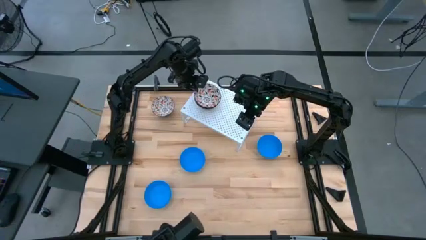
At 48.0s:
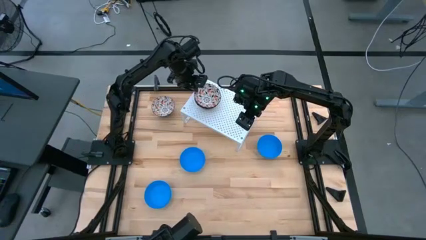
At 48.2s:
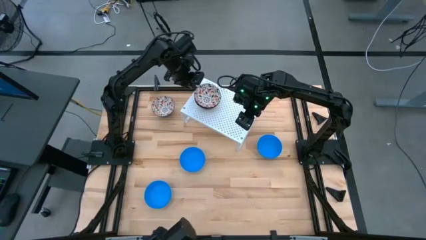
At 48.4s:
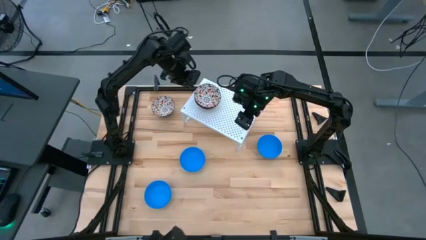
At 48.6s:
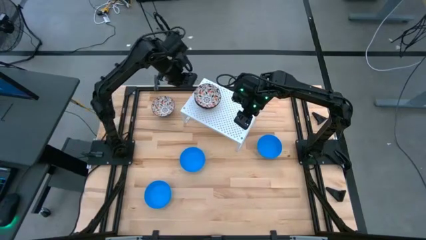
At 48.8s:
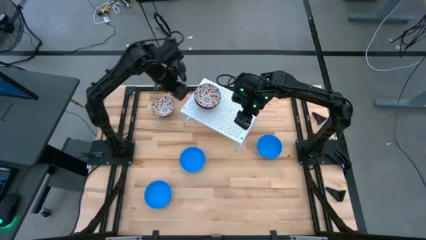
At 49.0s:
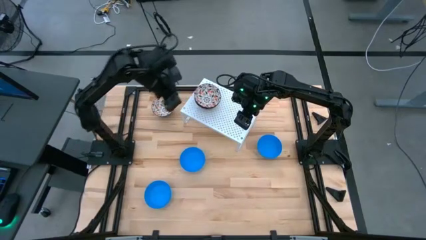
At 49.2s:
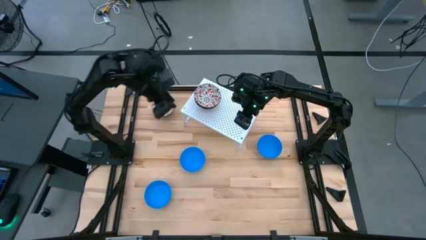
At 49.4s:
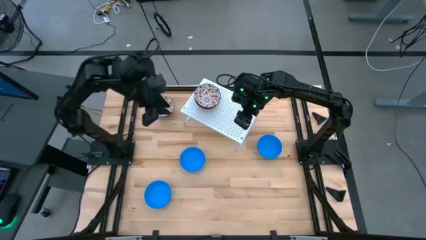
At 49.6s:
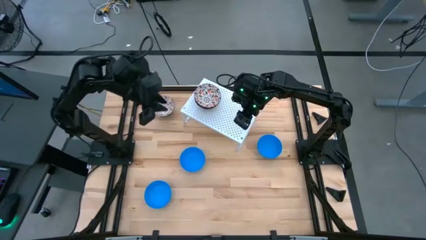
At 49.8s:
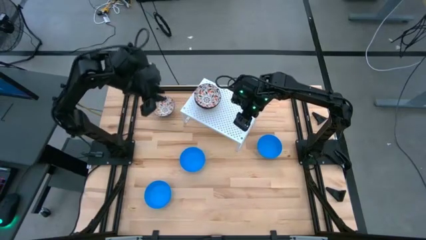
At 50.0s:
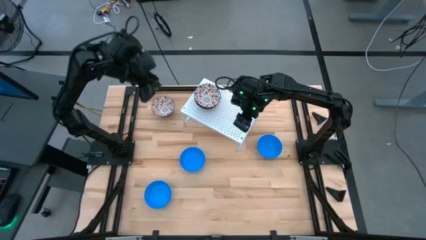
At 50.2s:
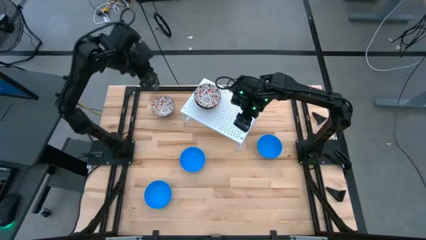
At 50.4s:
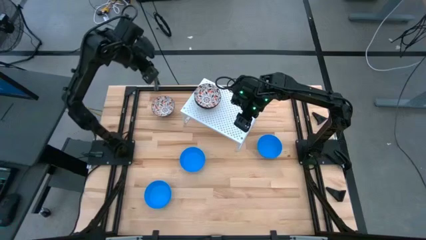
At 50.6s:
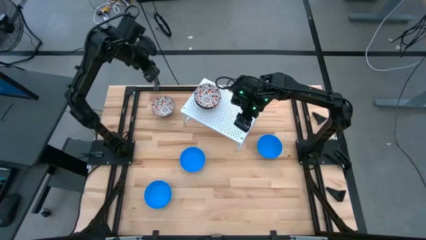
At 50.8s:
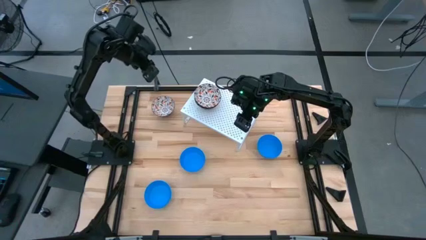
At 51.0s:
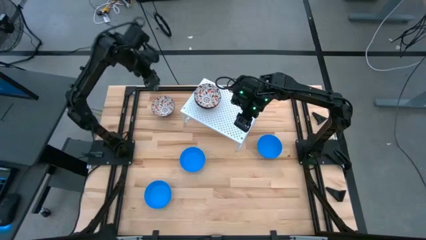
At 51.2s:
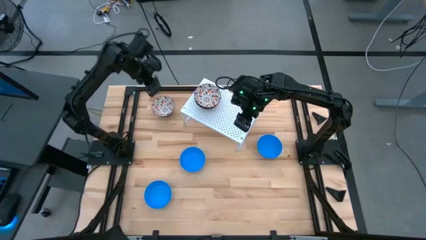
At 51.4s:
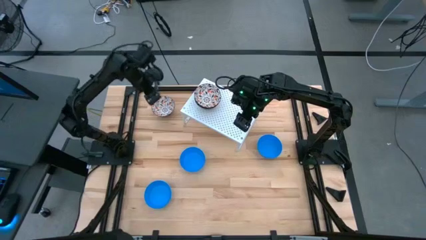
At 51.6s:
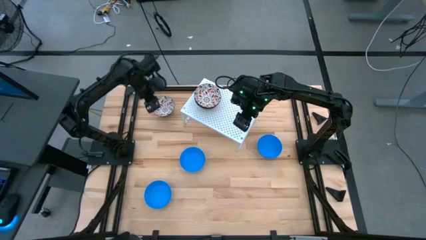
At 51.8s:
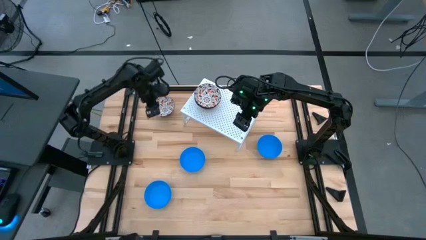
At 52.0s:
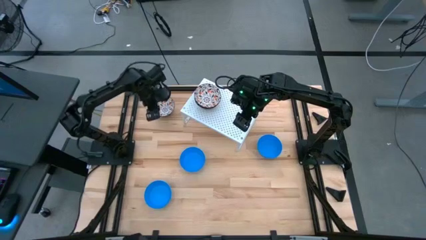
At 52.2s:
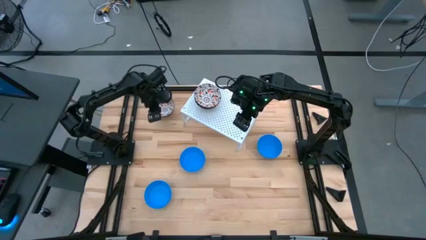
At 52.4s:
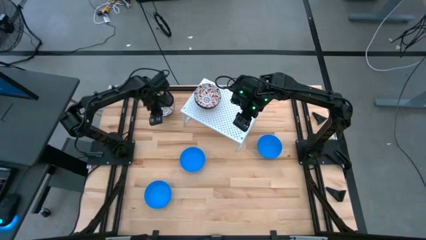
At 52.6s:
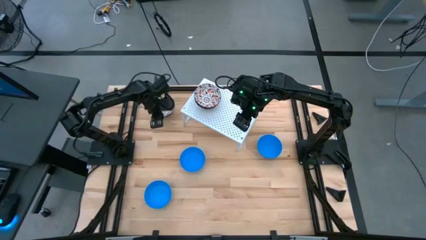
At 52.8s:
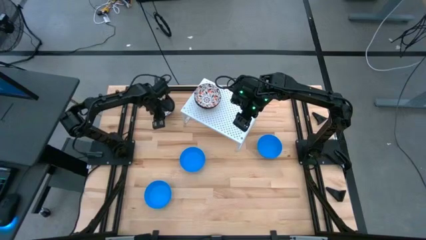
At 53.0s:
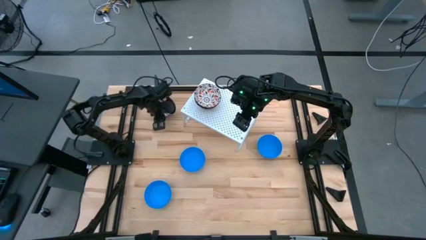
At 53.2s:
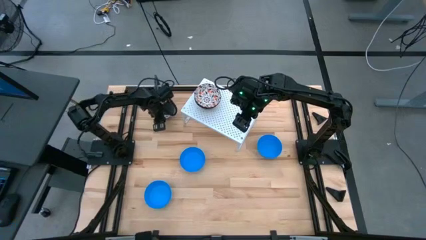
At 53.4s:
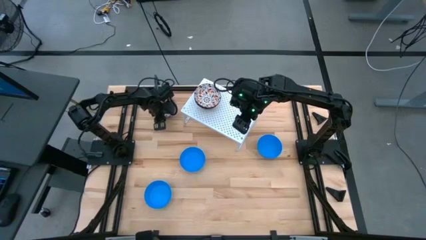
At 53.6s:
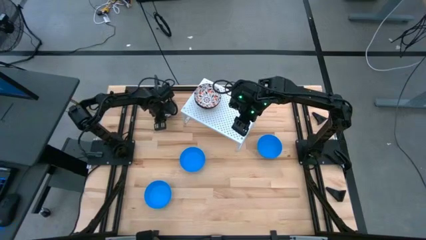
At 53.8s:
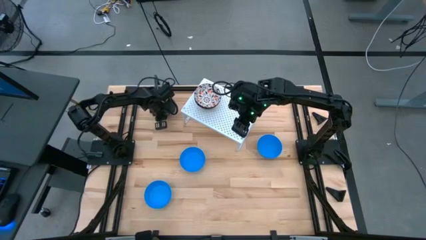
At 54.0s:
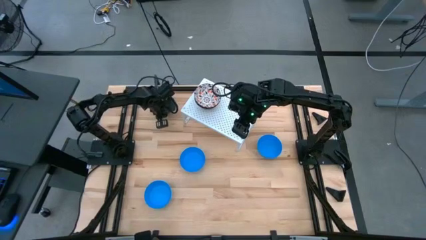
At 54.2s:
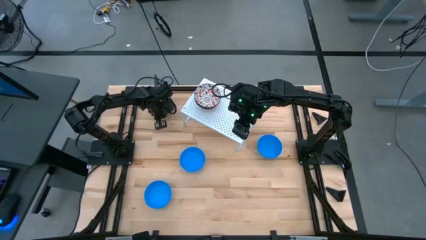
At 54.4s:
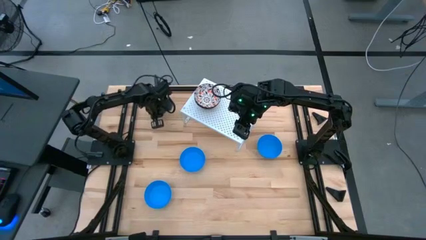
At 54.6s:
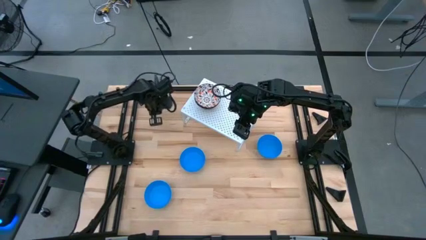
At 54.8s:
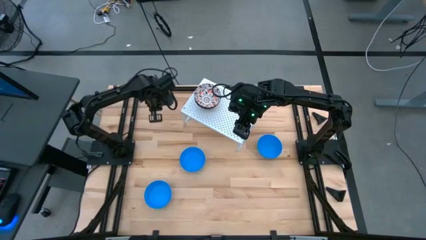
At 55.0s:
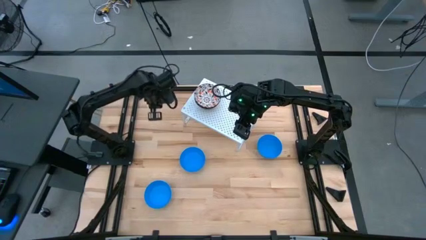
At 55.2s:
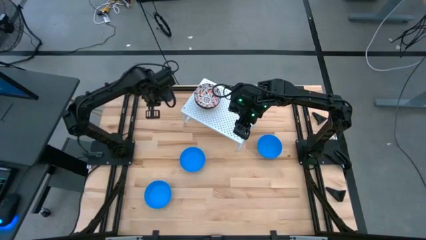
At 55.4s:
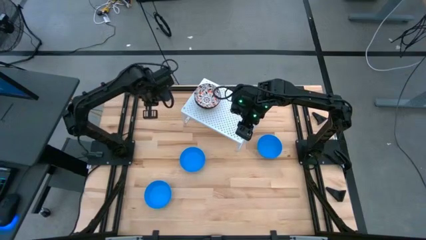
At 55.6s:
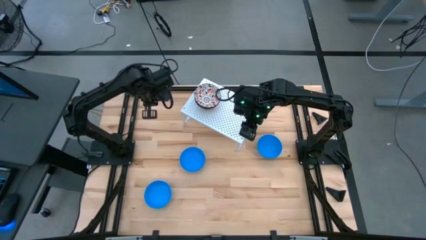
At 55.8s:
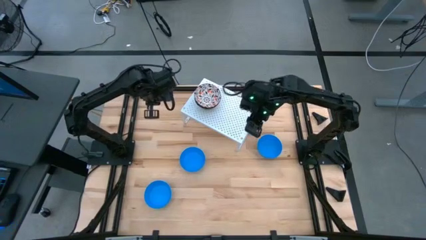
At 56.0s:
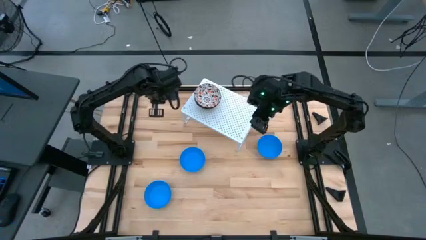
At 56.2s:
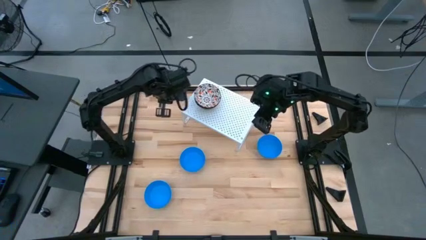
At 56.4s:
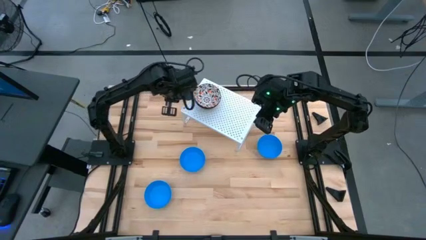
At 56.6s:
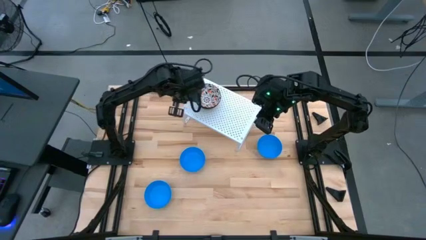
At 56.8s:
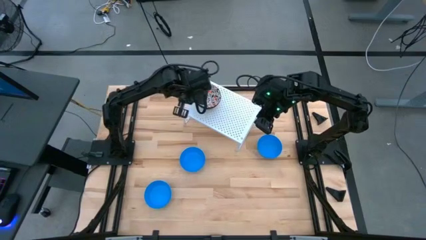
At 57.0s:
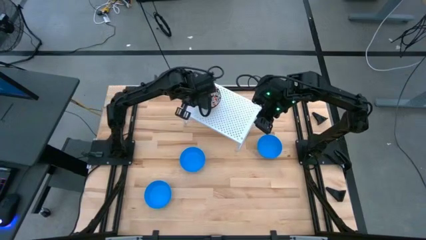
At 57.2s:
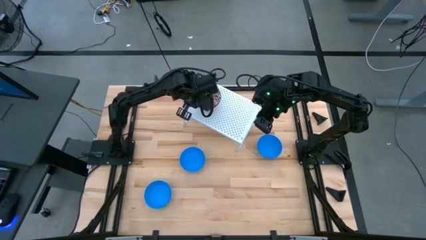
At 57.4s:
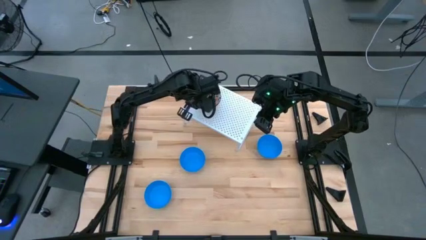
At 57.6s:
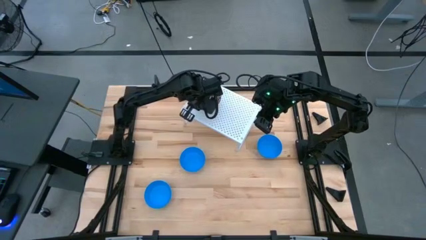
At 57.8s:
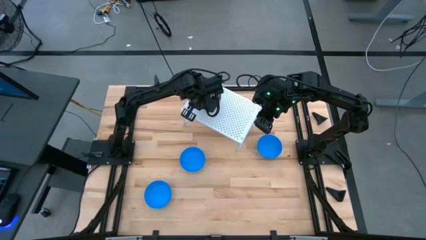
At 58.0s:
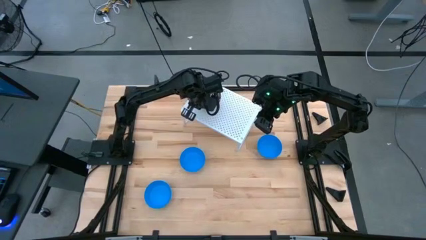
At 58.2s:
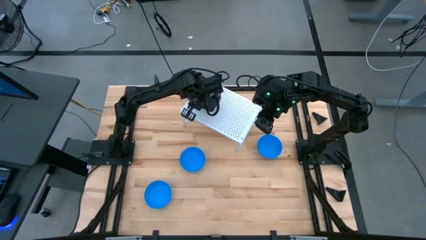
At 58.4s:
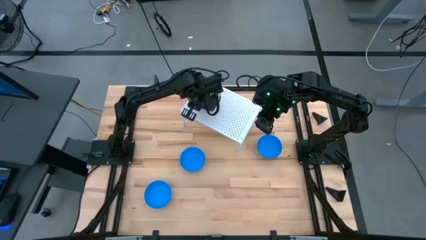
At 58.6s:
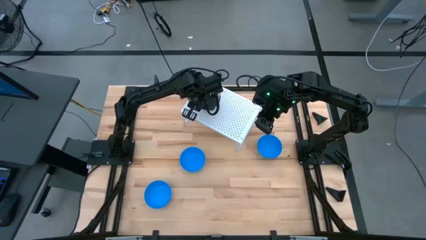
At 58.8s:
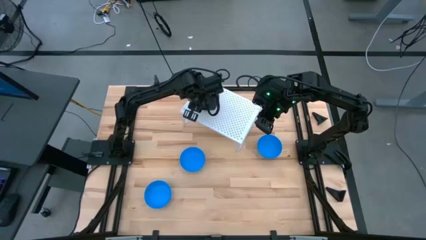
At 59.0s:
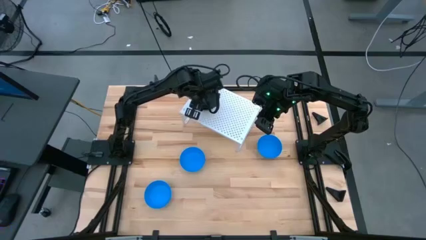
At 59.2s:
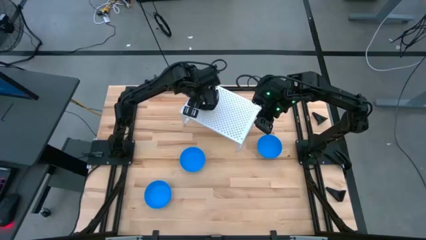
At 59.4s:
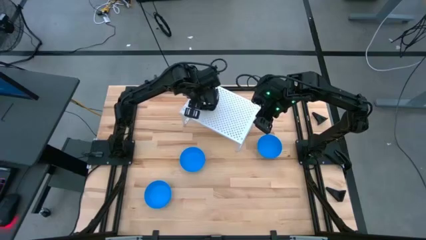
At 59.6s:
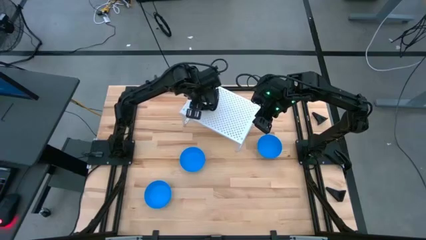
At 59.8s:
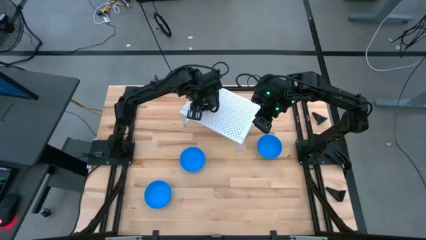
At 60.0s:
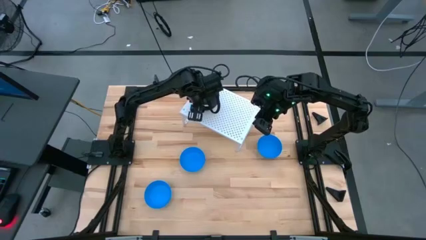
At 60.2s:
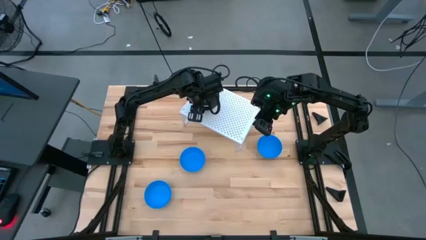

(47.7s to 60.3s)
Task: Pick & Place Mini bowls
Stack the white patterned bowl on top of the other white patterned bowls on the shelf

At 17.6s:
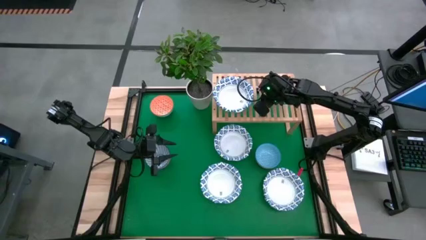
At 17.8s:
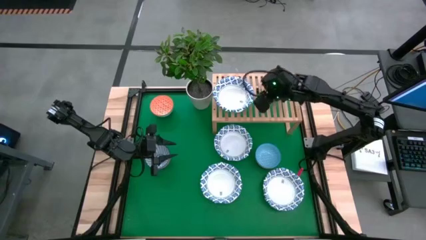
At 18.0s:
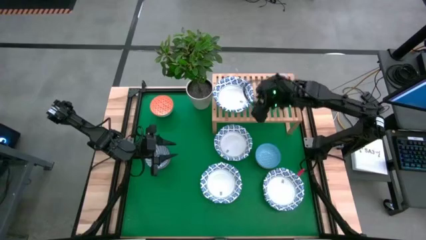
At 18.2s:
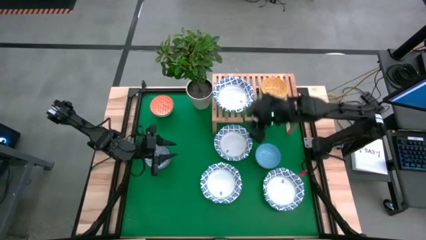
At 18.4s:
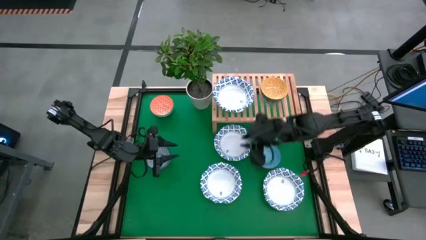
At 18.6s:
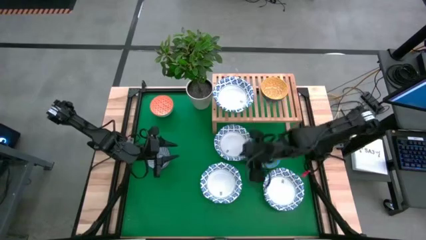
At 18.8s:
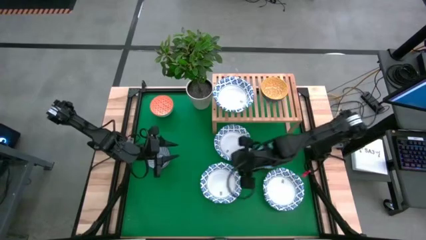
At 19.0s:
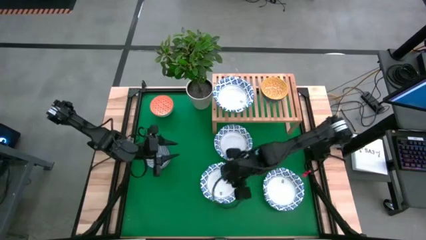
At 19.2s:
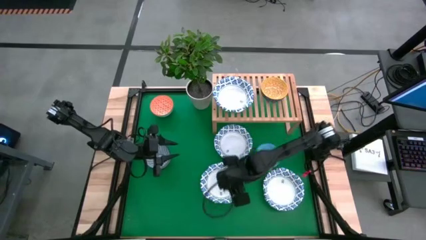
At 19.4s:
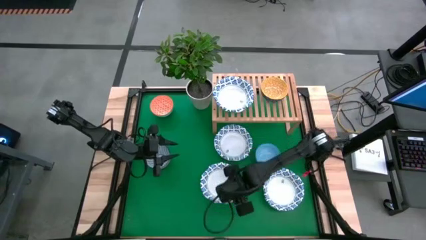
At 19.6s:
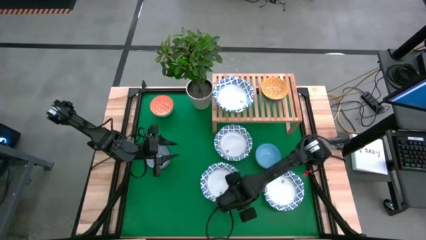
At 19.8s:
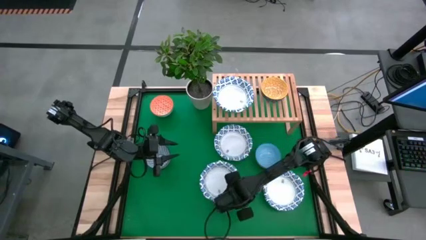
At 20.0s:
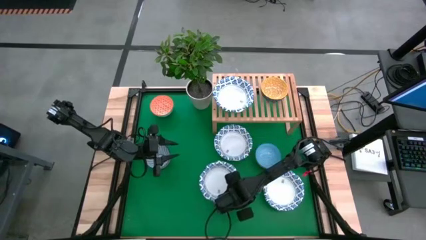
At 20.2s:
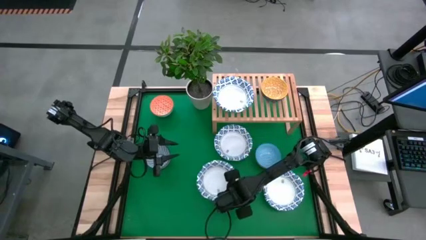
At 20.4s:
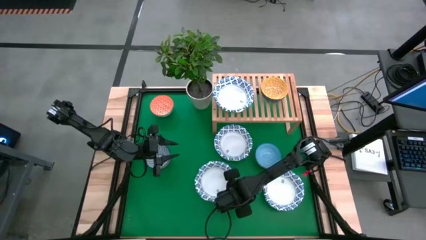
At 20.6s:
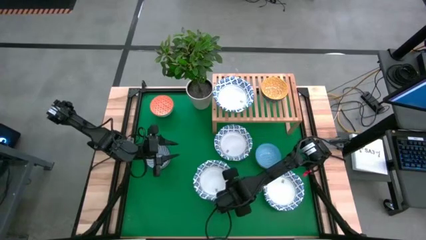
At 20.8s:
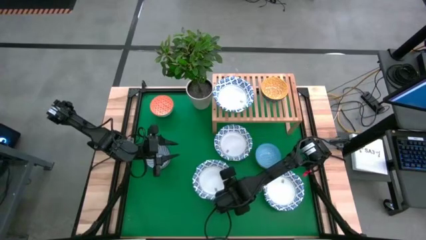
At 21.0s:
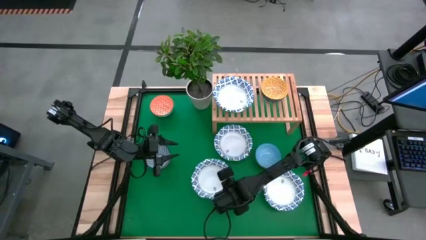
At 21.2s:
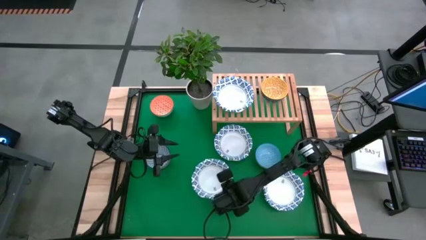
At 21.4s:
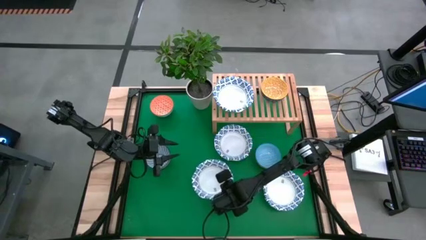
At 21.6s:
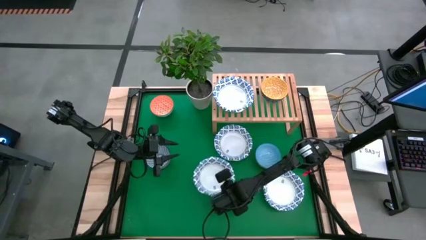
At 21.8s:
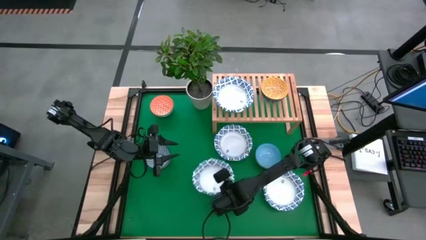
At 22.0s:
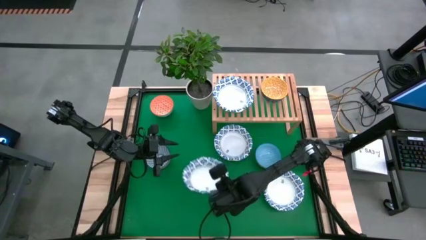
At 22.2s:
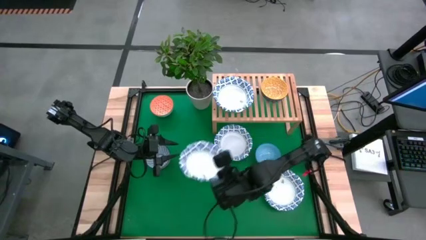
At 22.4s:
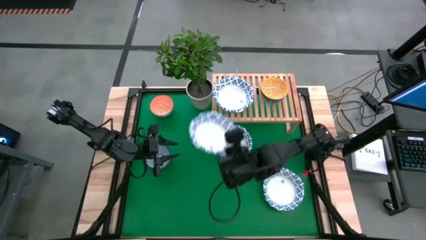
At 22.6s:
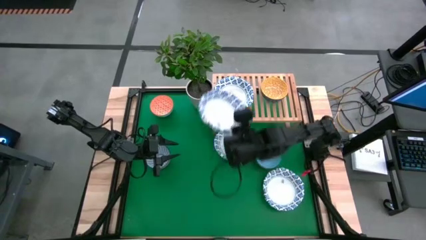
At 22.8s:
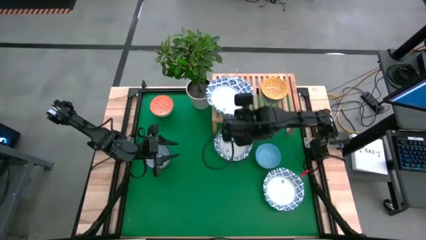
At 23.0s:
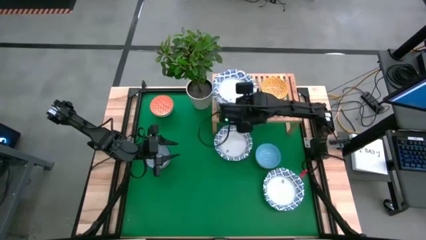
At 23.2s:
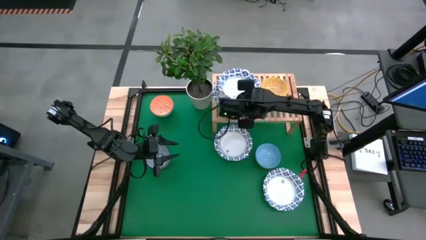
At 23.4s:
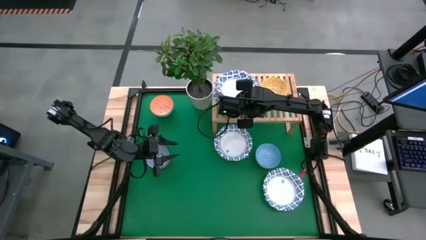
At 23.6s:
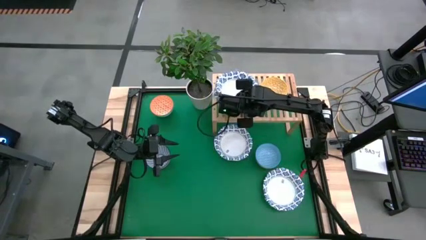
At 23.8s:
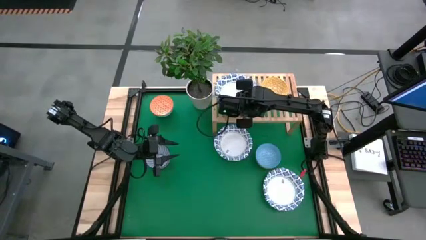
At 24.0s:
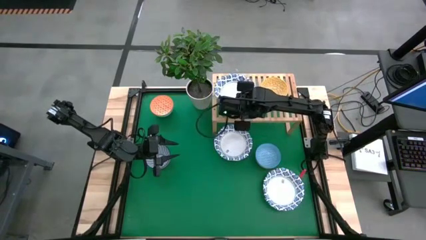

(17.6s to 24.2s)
Task: Place and stack bowls onto a shelf
Stack the bottom left white plate on top of the white plate on the shelf
